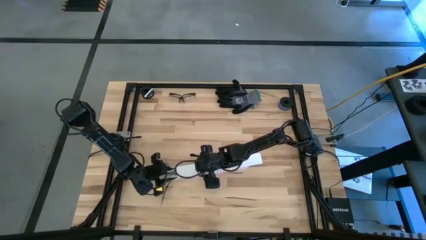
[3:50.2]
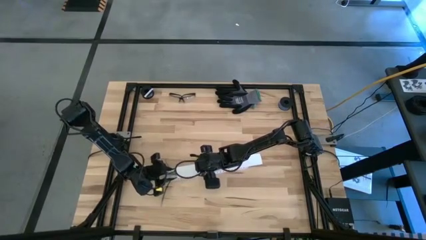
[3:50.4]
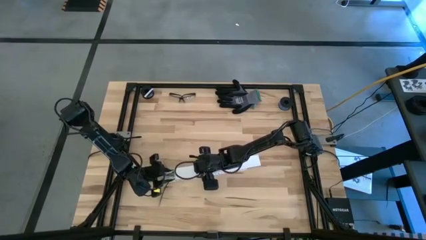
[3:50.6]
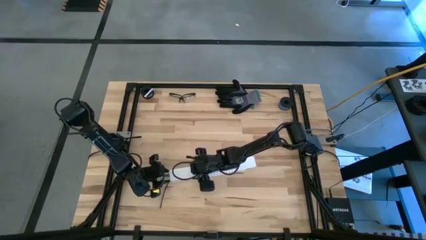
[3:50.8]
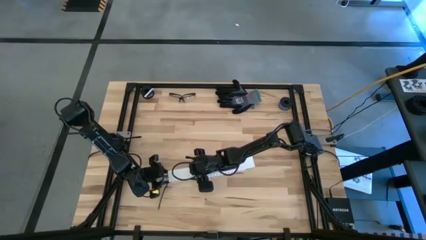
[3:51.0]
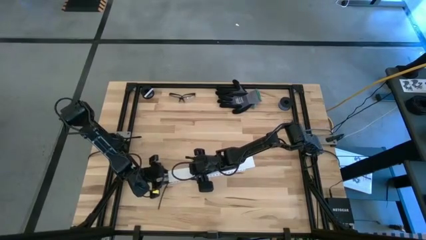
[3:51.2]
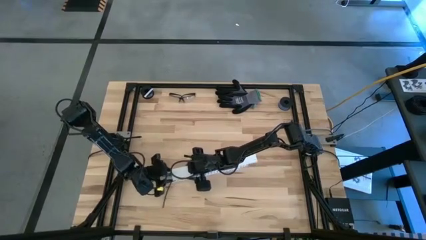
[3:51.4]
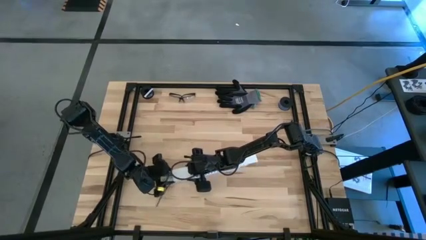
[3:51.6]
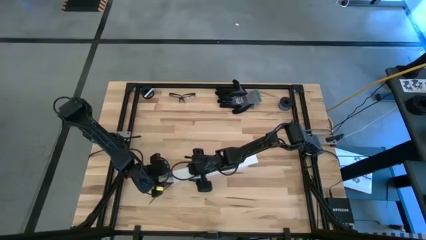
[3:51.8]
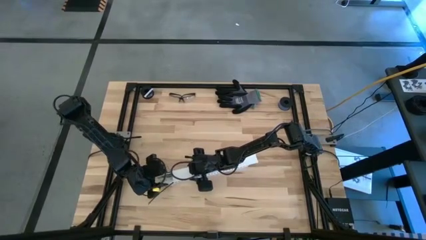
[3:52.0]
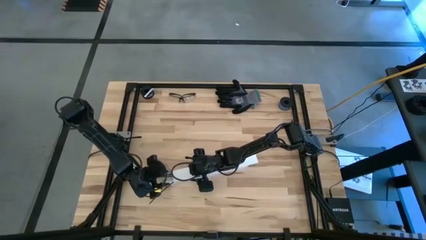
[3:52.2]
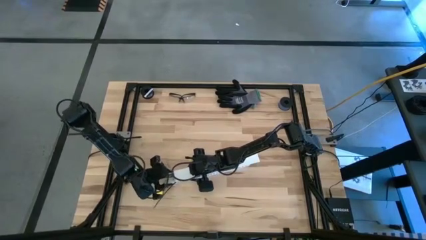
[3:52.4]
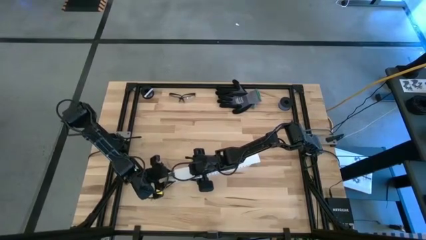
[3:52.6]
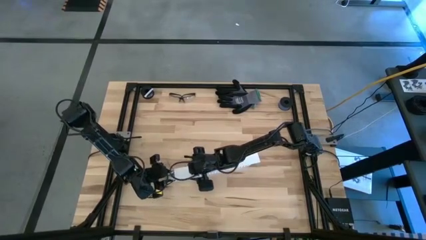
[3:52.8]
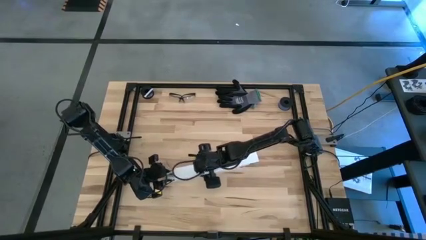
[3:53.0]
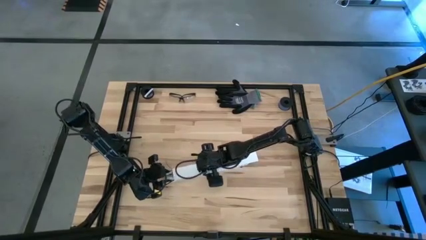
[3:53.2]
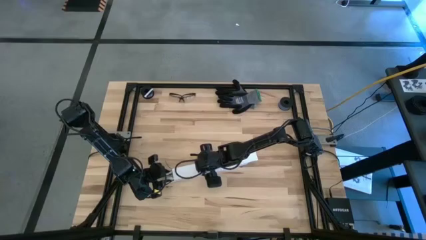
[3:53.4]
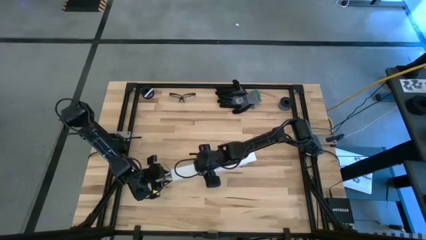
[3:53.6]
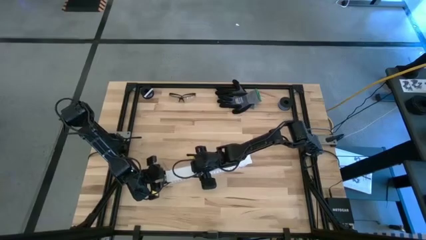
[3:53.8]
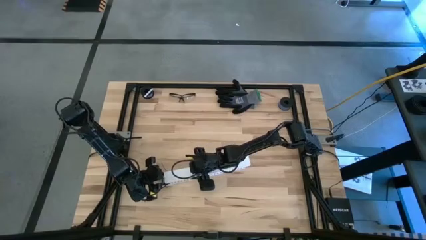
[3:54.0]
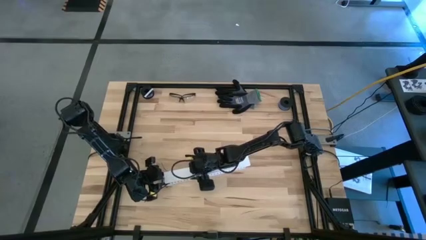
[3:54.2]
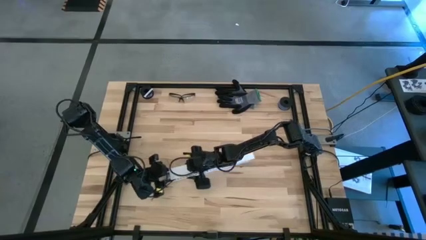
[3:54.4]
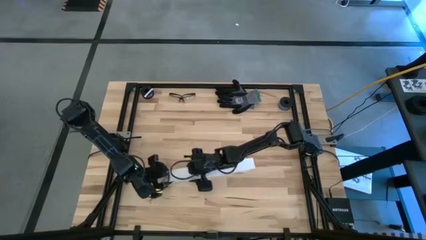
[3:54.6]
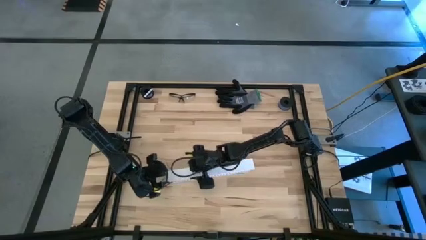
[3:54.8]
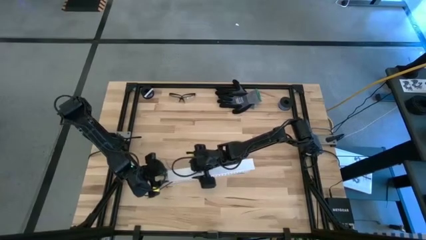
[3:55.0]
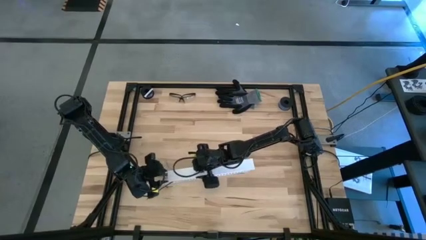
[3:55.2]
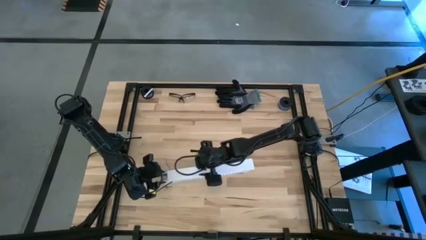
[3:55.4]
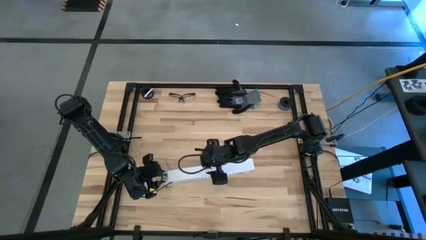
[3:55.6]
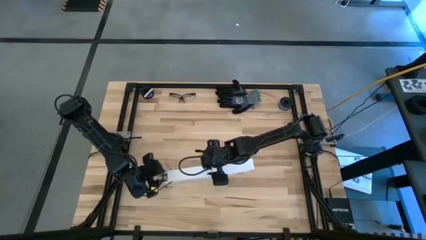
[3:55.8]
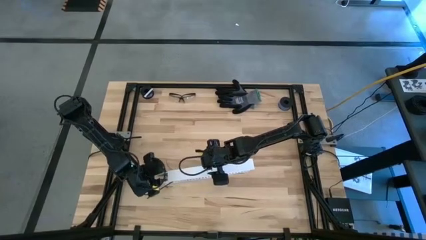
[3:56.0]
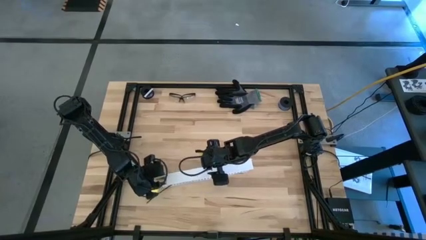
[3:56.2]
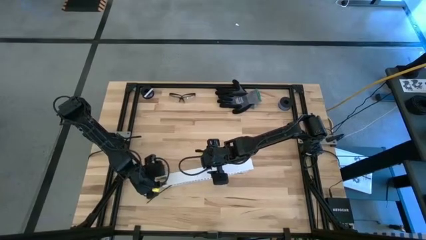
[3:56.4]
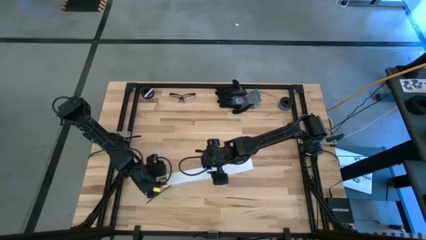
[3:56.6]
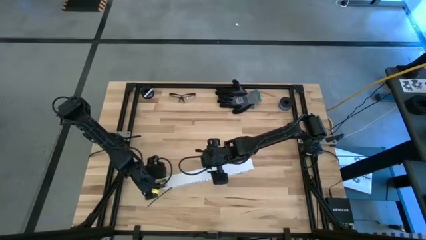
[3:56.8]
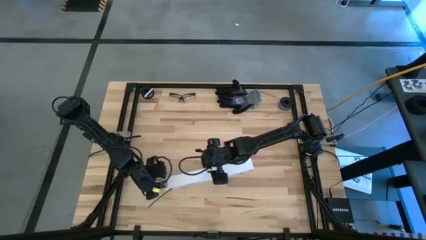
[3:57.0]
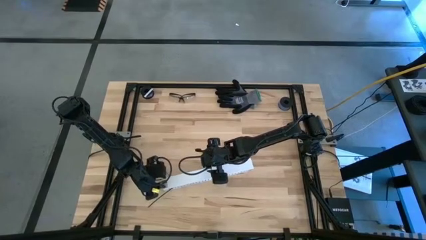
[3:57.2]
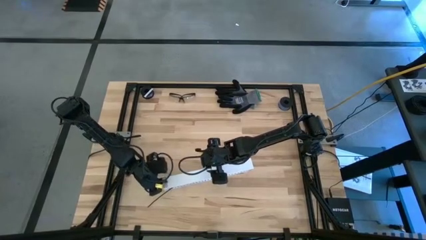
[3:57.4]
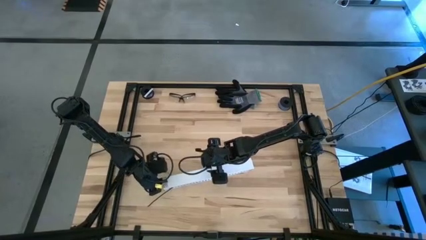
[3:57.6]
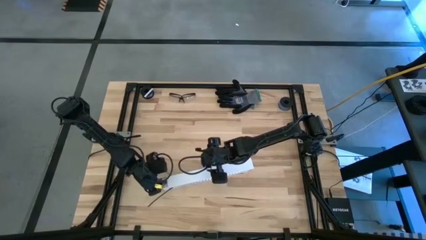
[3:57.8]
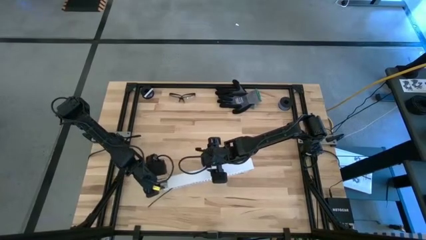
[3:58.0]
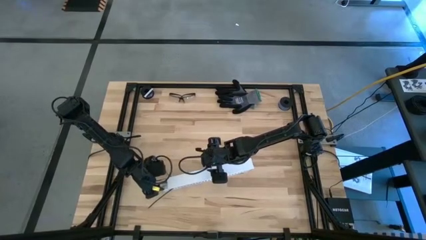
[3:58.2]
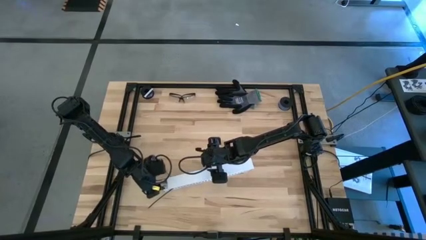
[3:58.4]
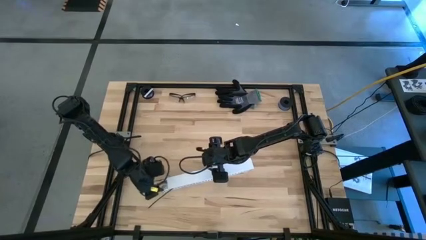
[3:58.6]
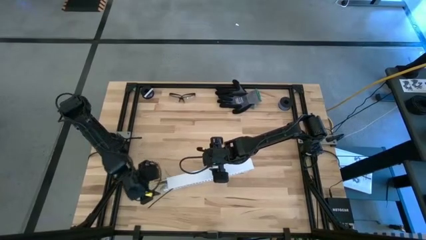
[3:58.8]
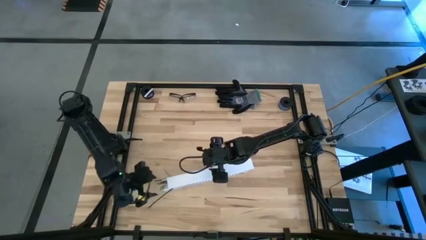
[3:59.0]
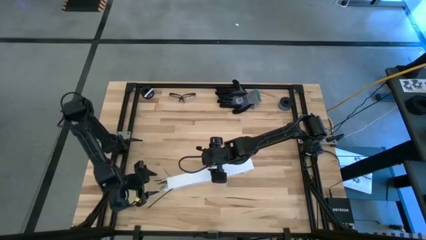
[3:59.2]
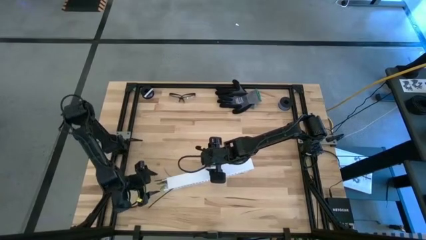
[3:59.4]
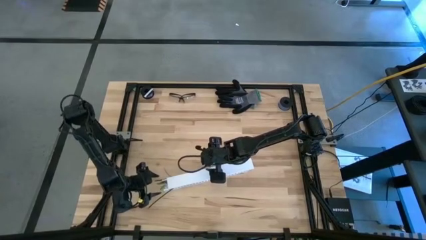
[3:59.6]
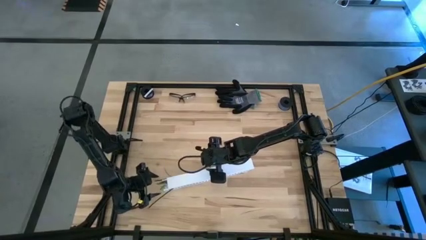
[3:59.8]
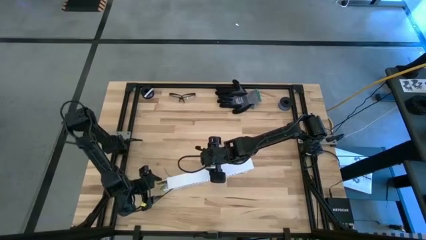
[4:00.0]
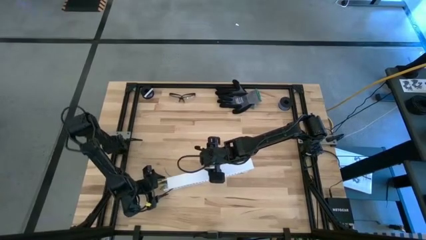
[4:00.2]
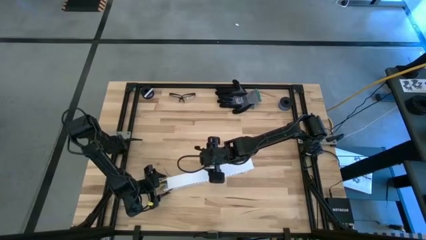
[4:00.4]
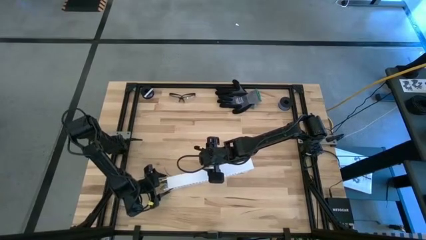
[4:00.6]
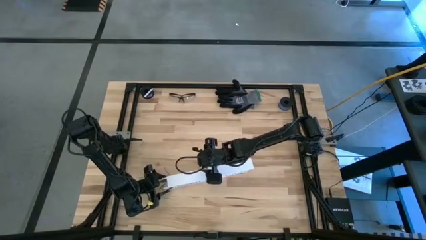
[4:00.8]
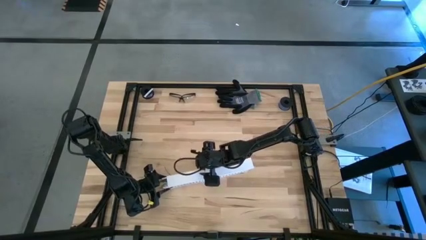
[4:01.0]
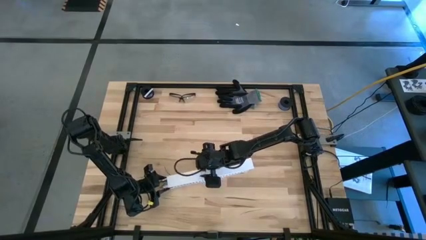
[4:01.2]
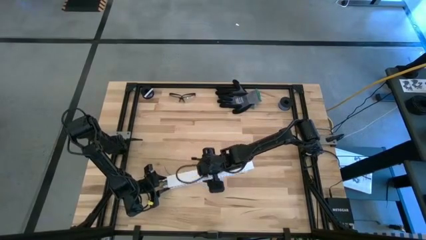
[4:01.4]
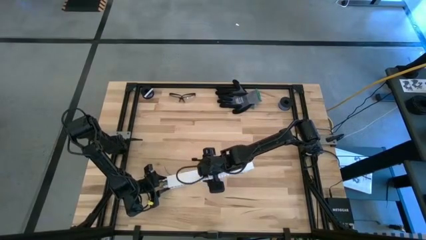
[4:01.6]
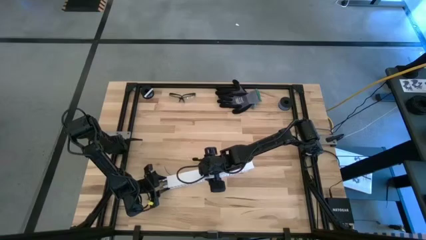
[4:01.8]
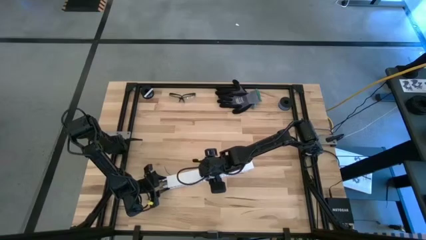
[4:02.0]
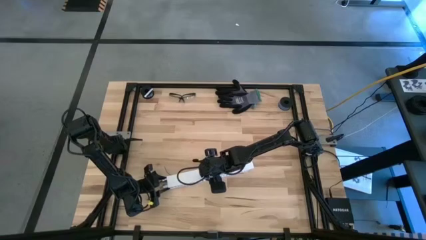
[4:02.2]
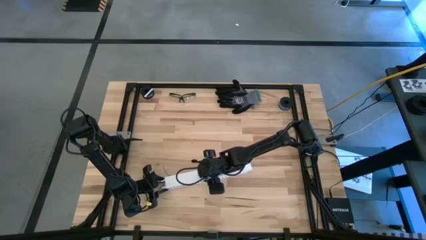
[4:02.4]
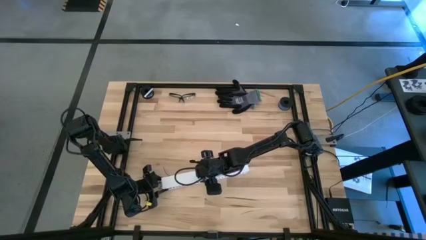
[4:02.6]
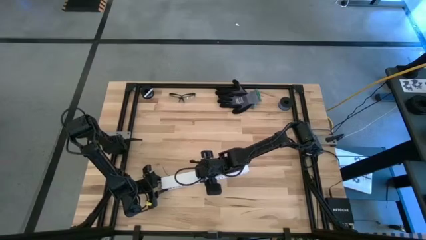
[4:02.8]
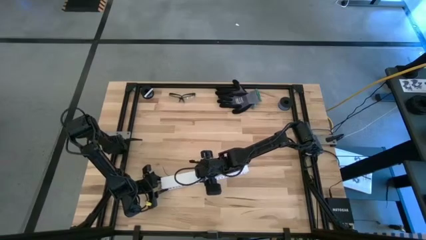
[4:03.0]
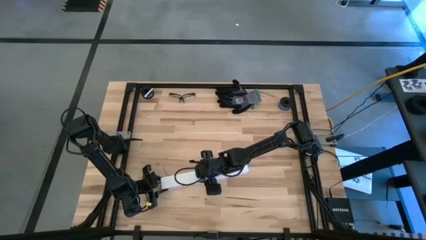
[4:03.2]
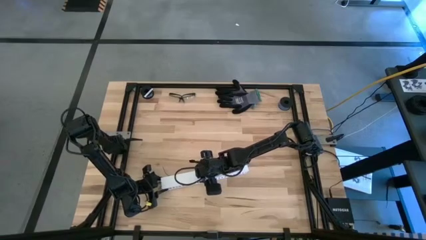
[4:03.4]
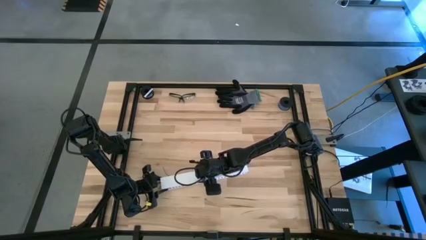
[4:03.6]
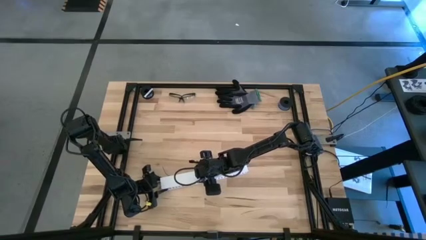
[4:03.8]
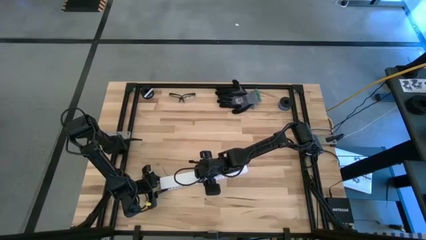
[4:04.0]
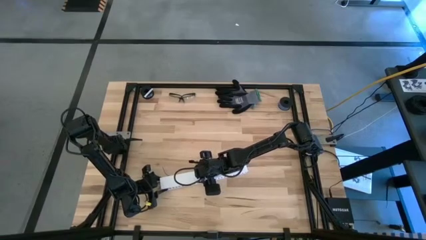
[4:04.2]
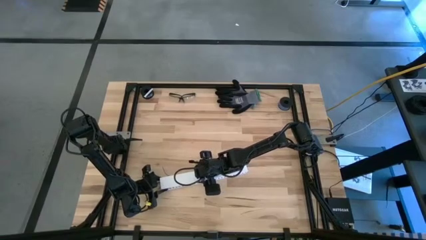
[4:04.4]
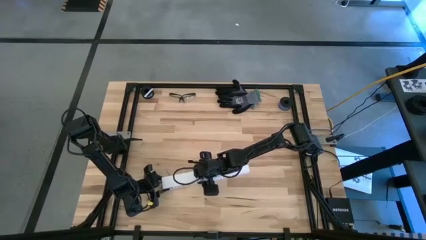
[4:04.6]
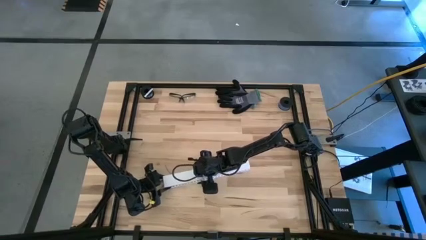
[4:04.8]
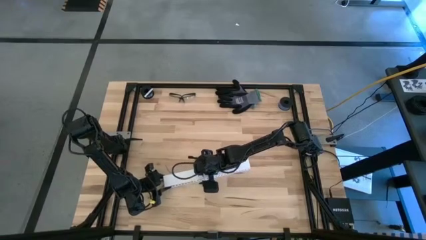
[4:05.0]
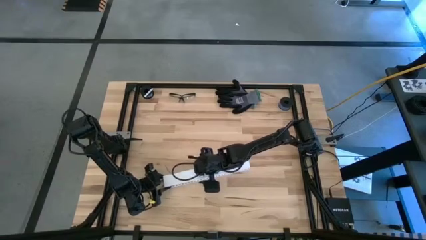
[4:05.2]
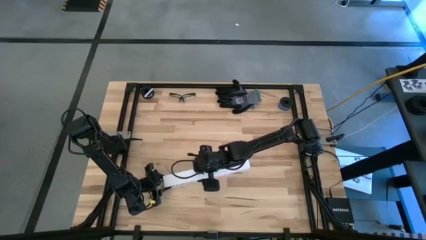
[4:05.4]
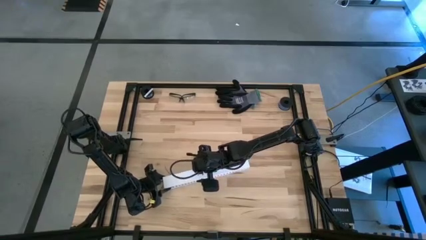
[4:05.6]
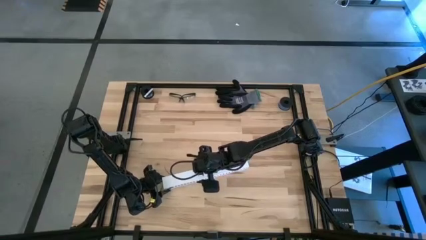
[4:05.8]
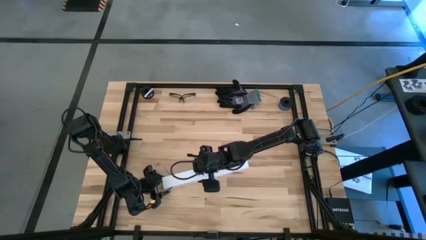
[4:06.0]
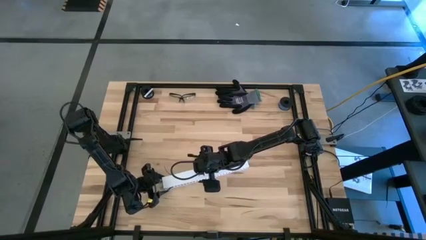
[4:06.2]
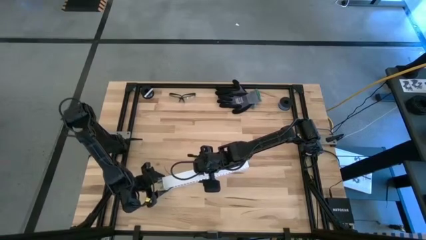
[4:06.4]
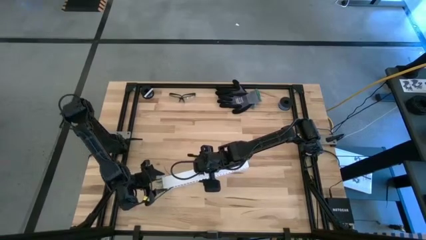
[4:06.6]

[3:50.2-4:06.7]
Task: Ziptie cables
Close the white cable duct
